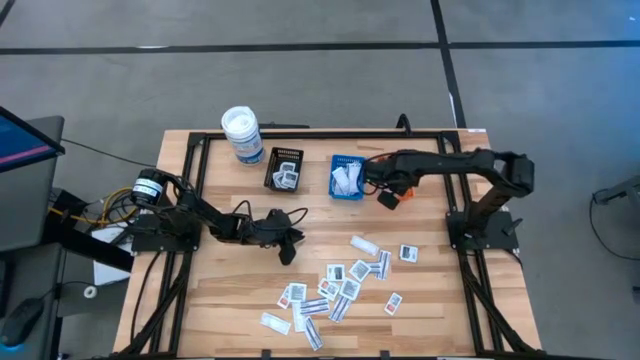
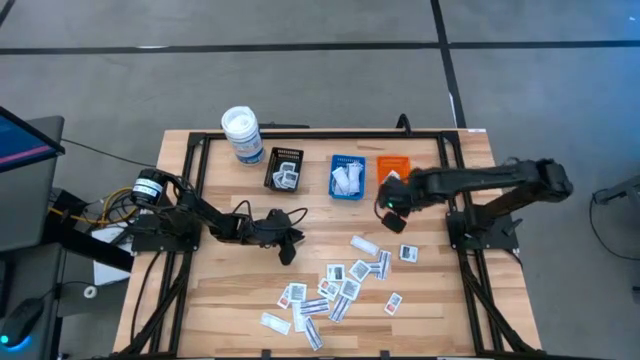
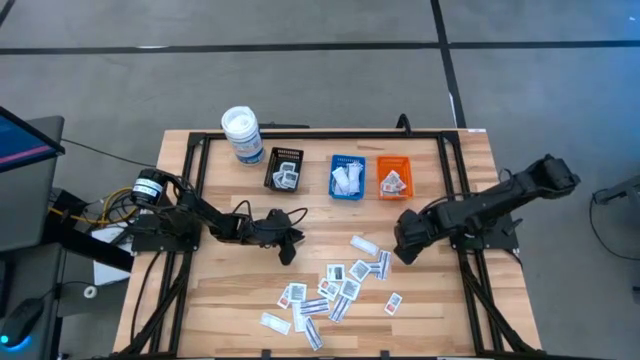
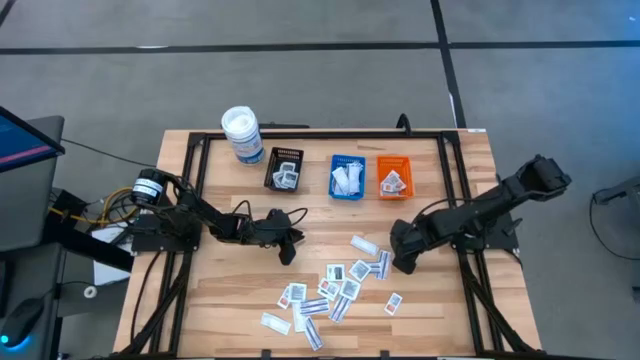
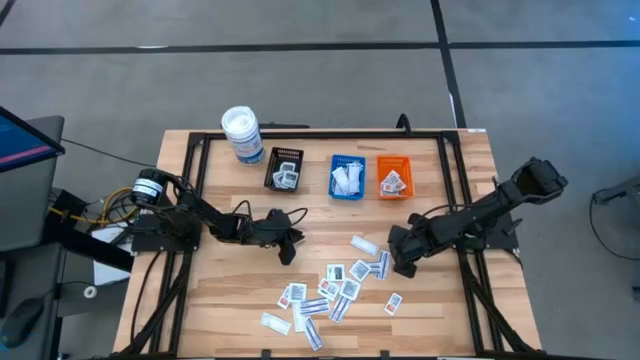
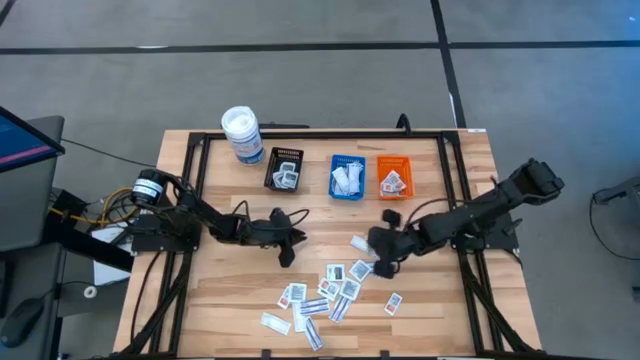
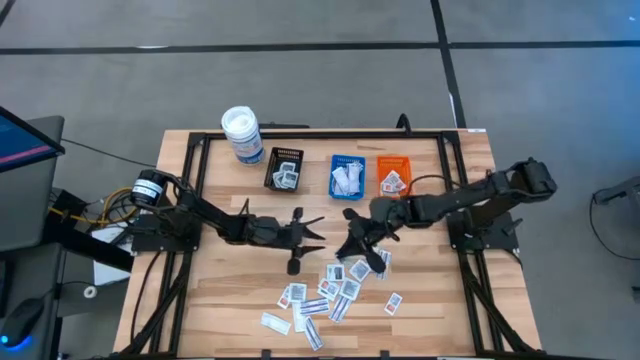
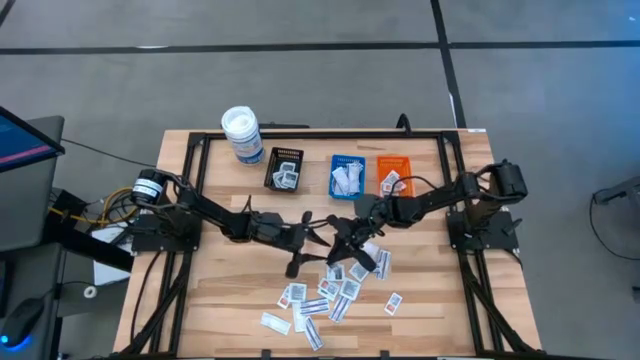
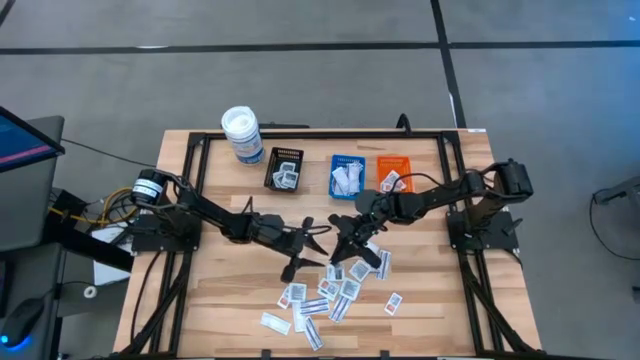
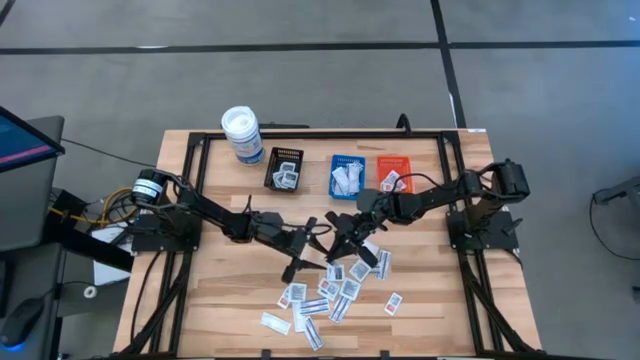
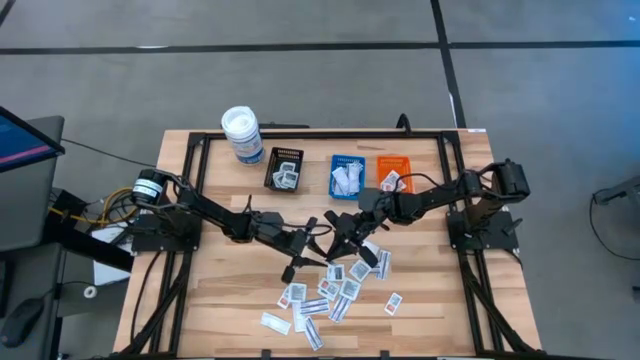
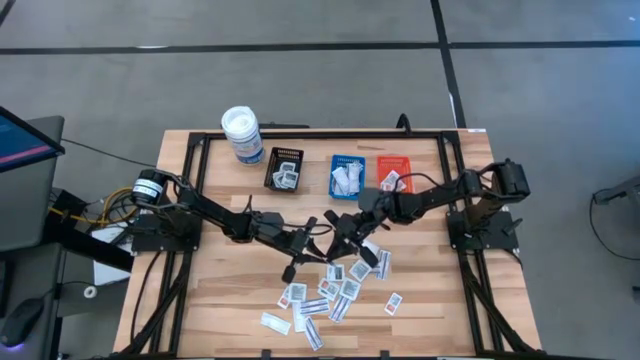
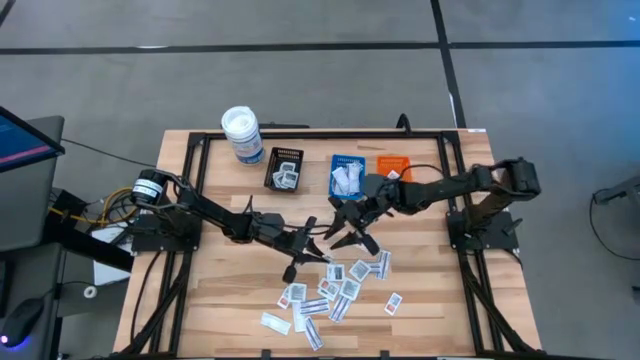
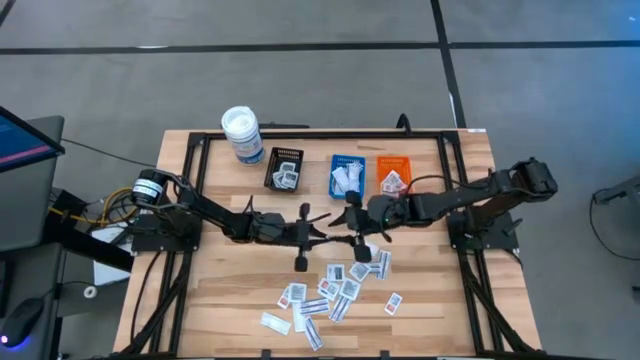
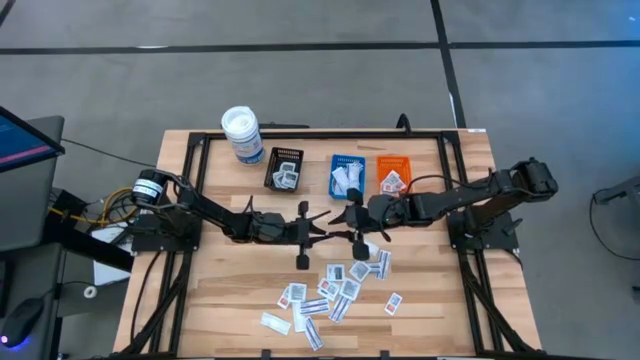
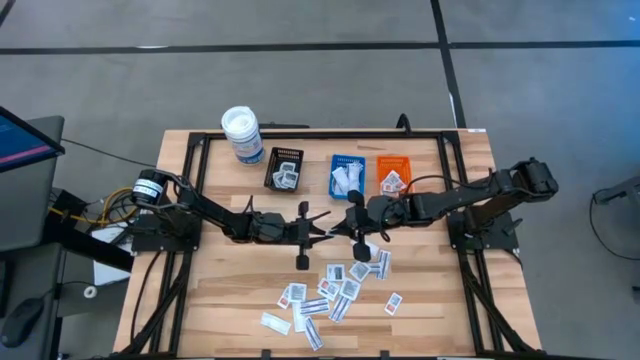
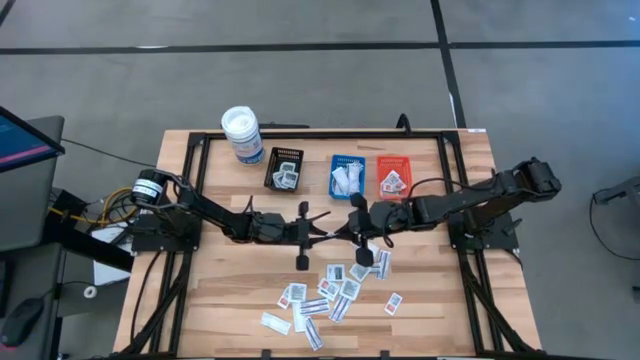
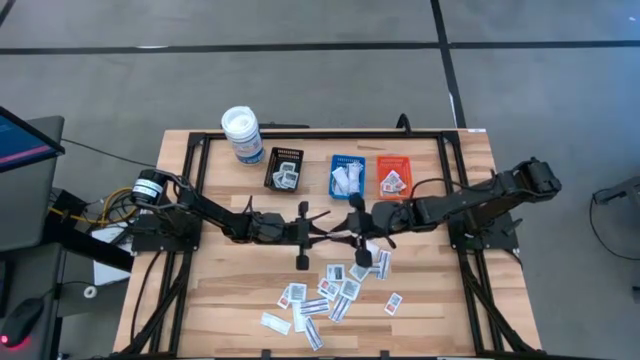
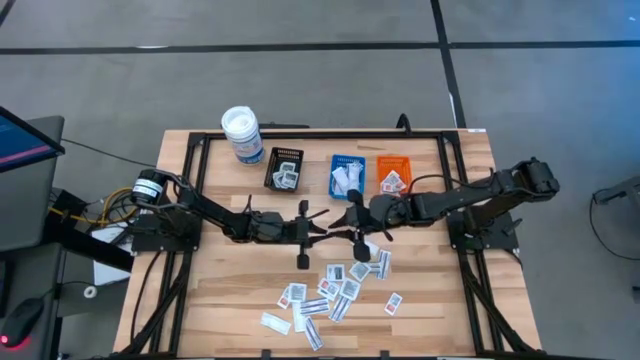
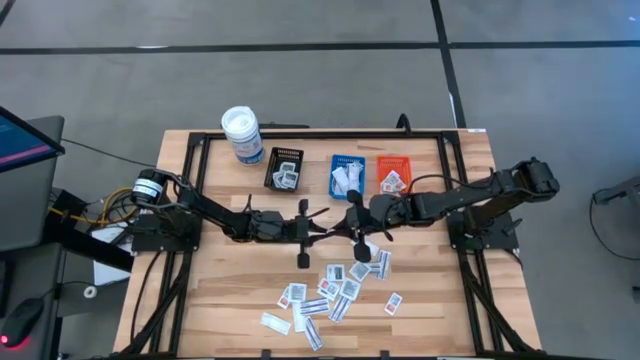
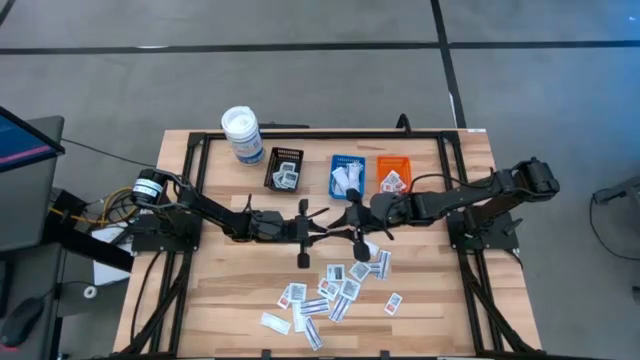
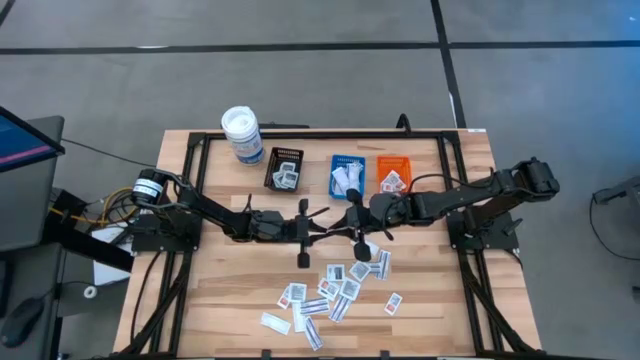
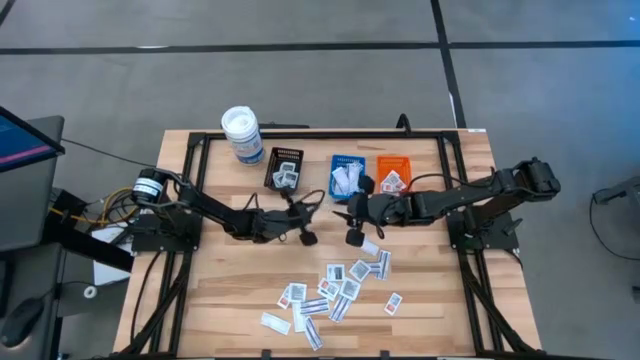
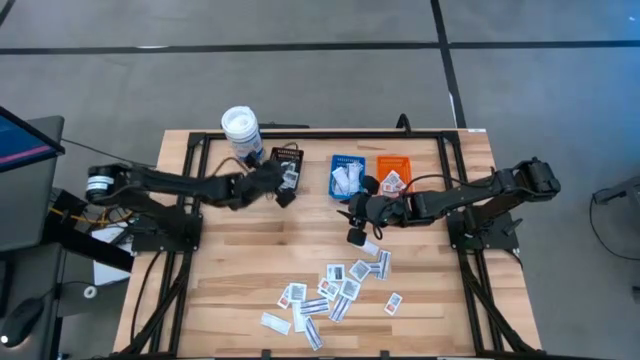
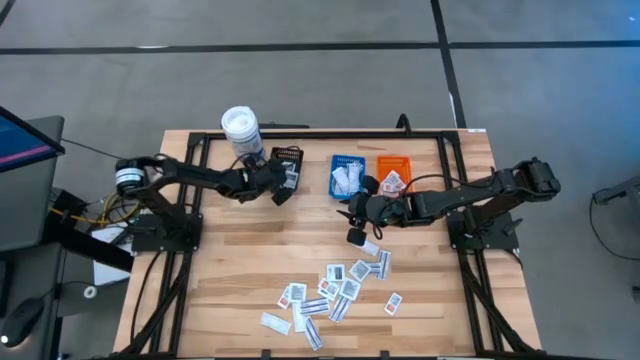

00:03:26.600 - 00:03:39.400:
Task: Pick & Place First Aid Supplies
Put the black towelette pack into the black bin

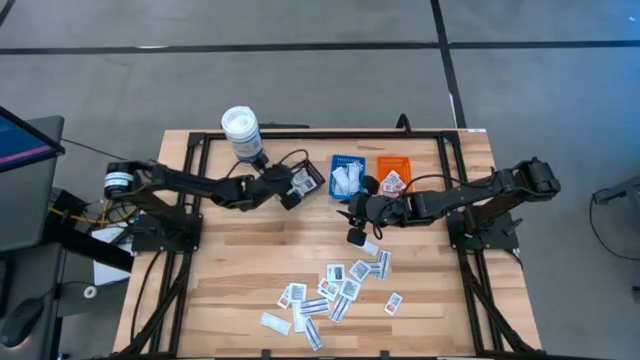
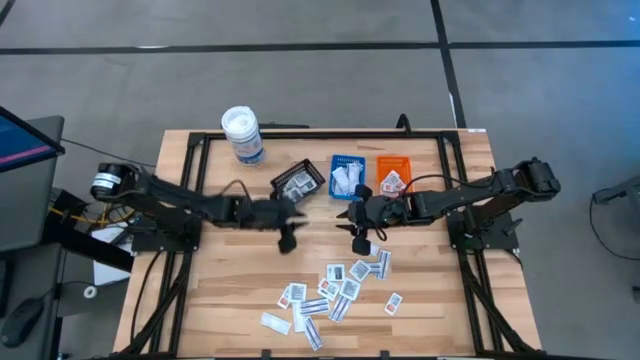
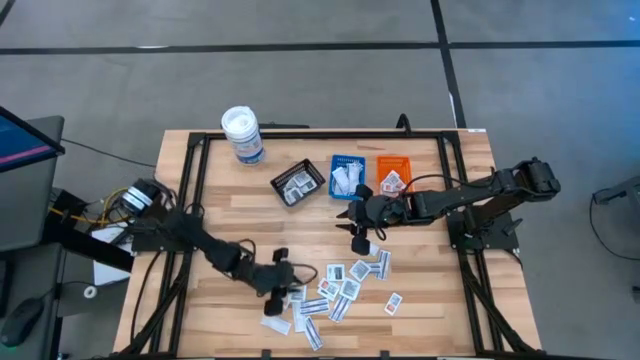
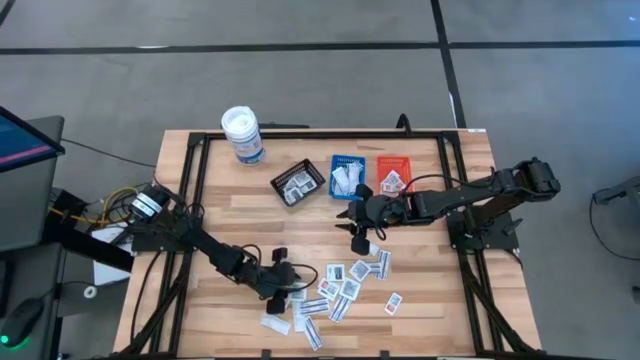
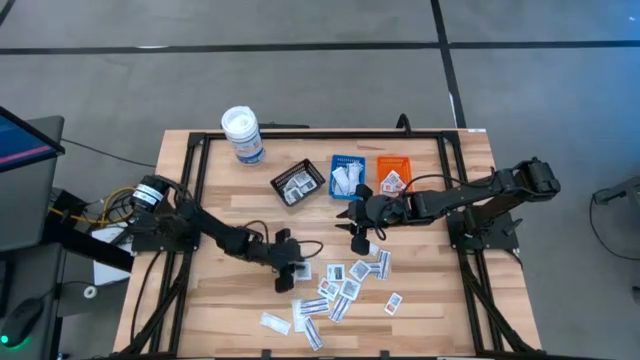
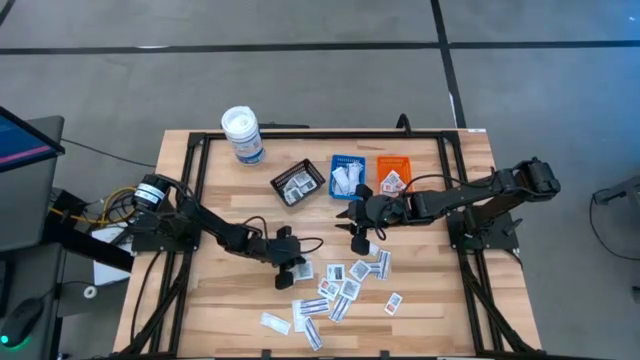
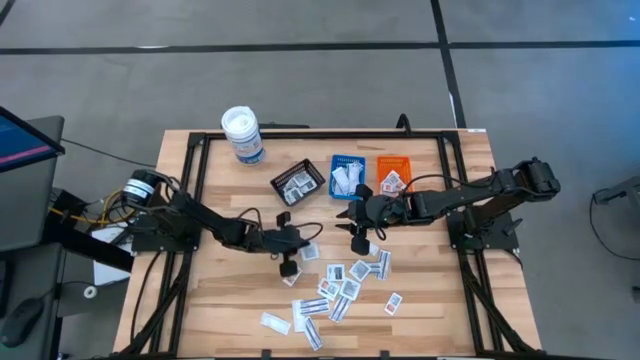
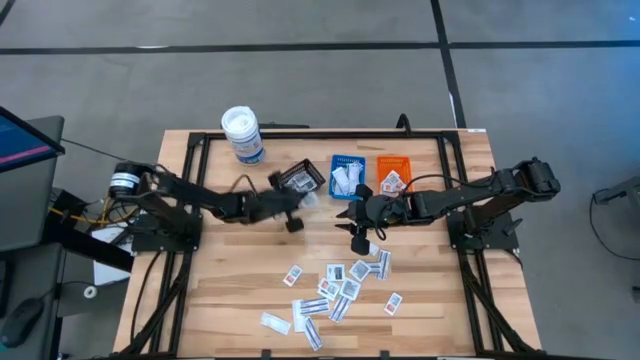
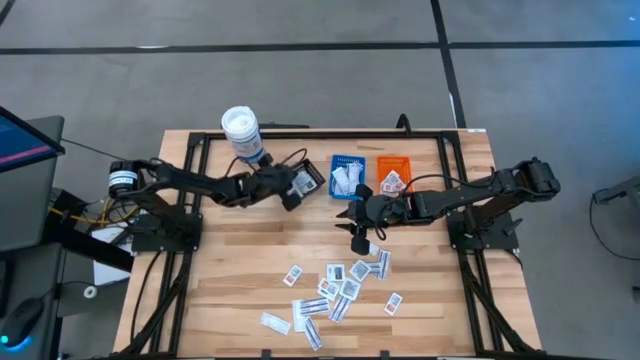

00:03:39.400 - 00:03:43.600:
Put the black towelette pack into the black bin

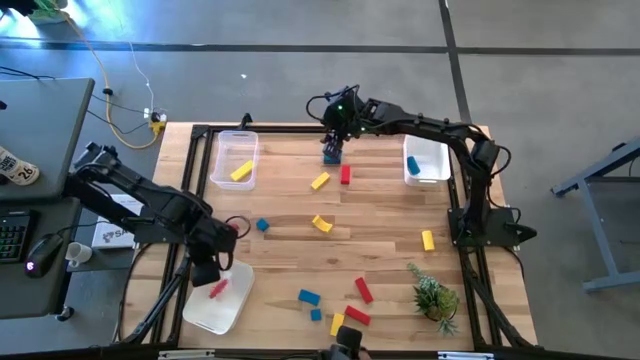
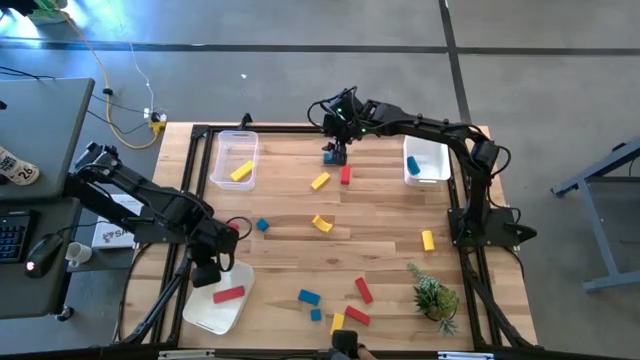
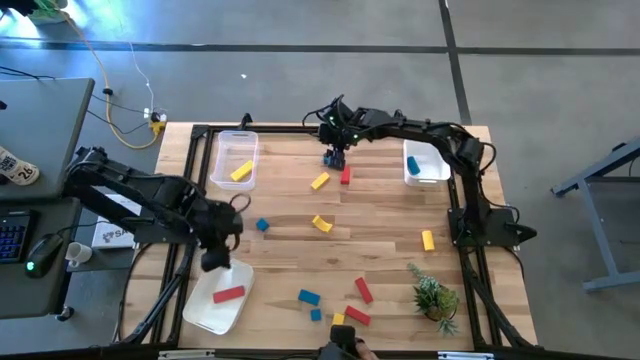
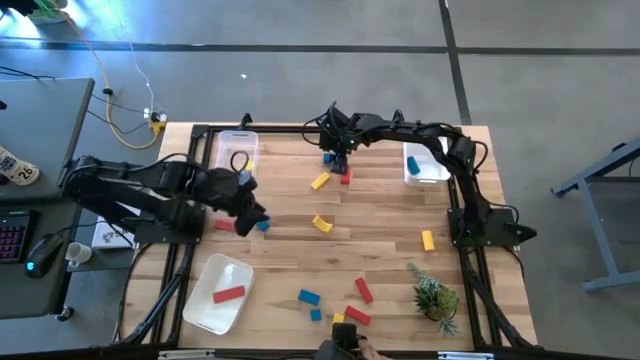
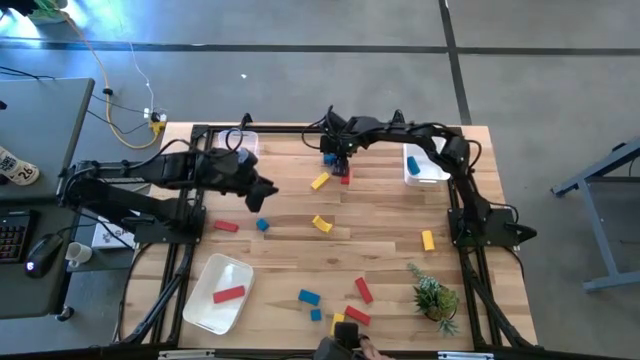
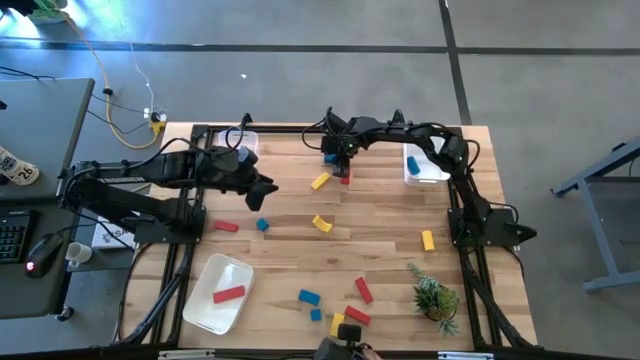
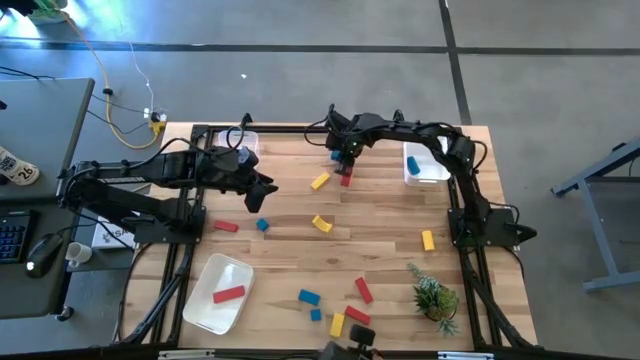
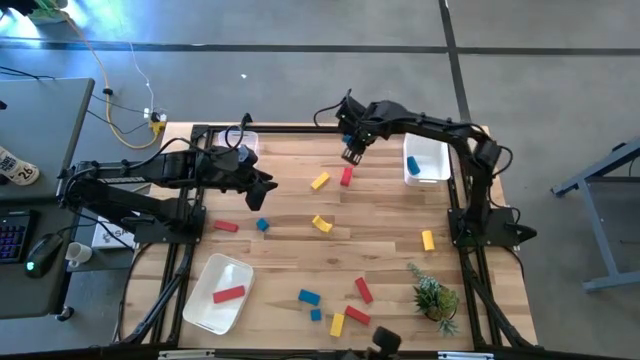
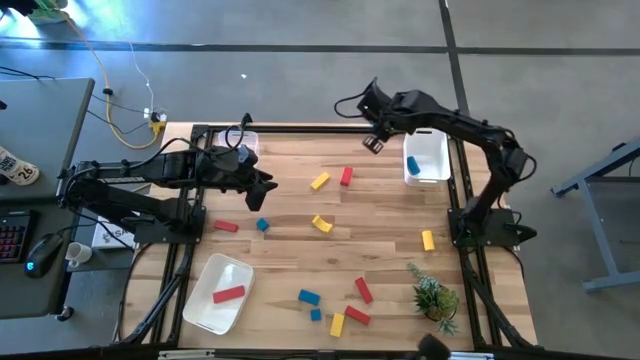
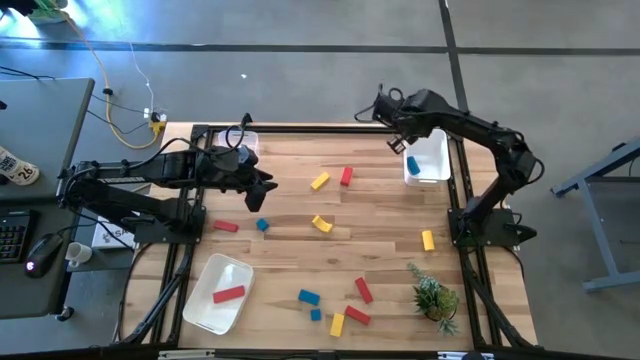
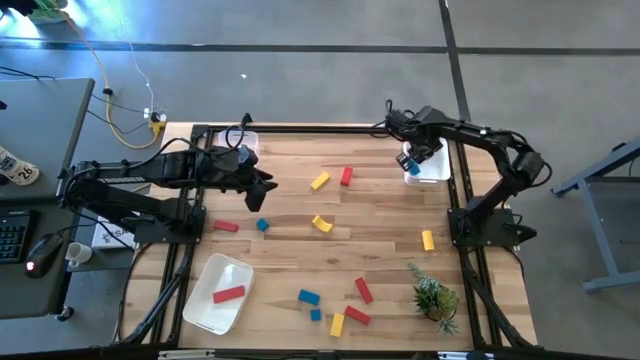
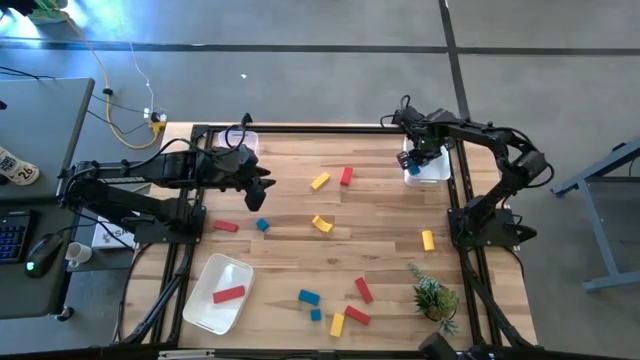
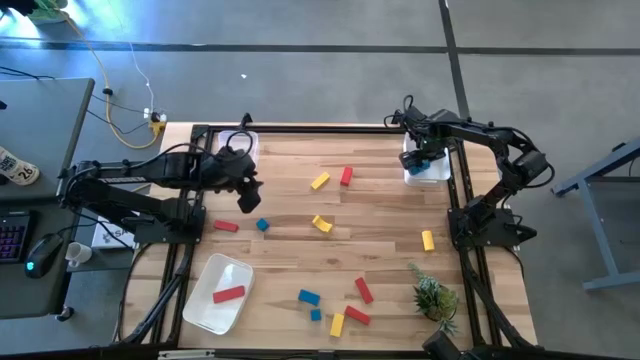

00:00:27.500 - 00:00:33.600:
Task: Sort & place blocks by color
Put the blue block into the top white bin
